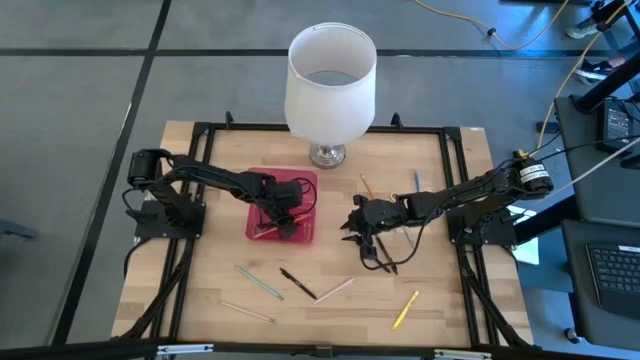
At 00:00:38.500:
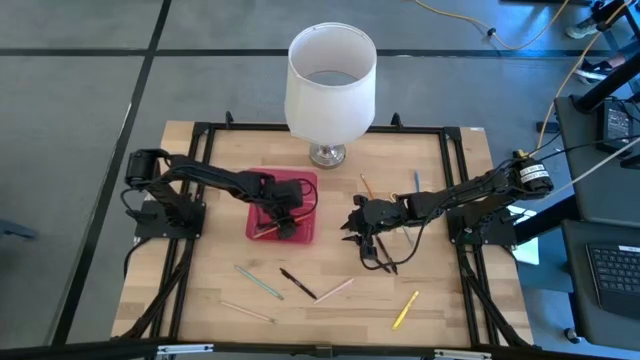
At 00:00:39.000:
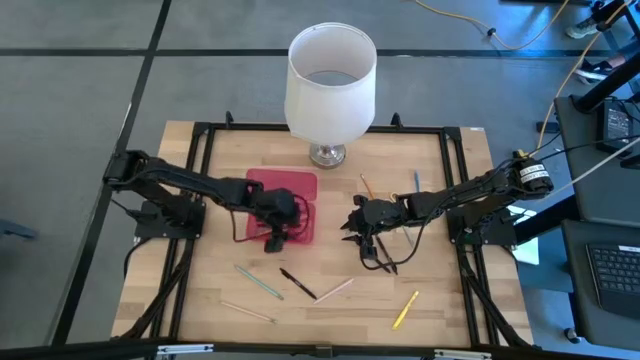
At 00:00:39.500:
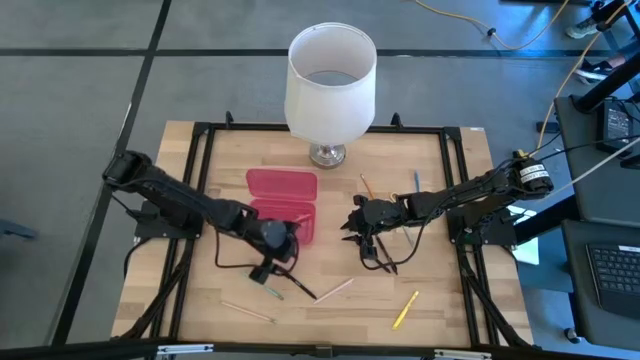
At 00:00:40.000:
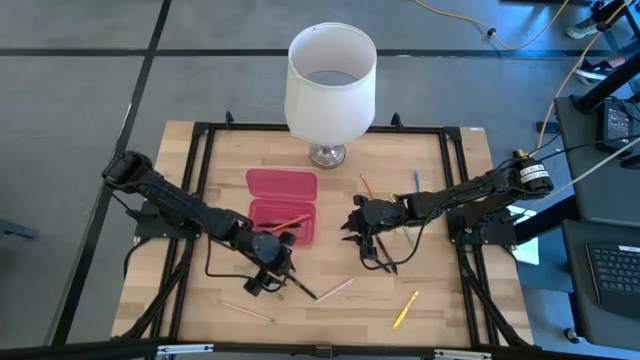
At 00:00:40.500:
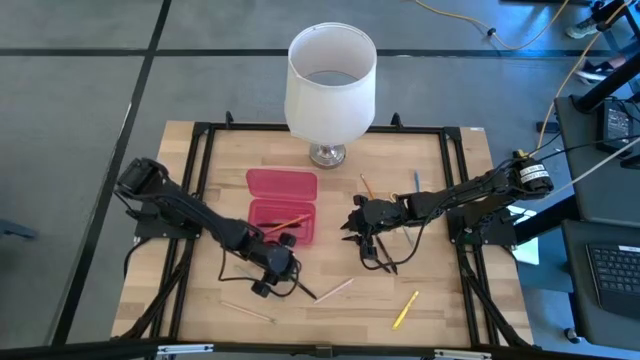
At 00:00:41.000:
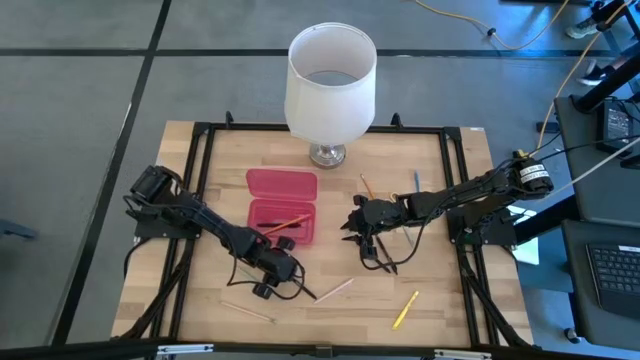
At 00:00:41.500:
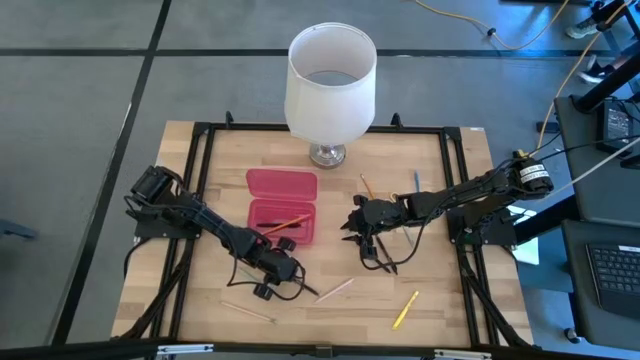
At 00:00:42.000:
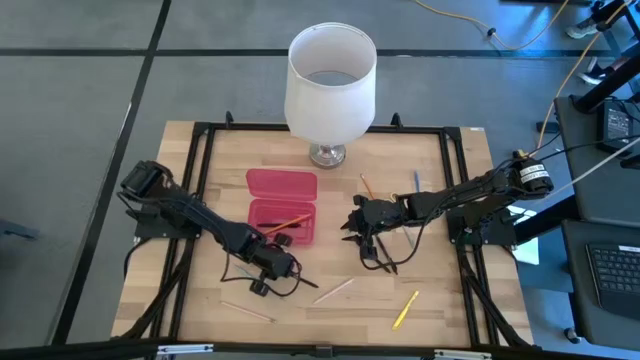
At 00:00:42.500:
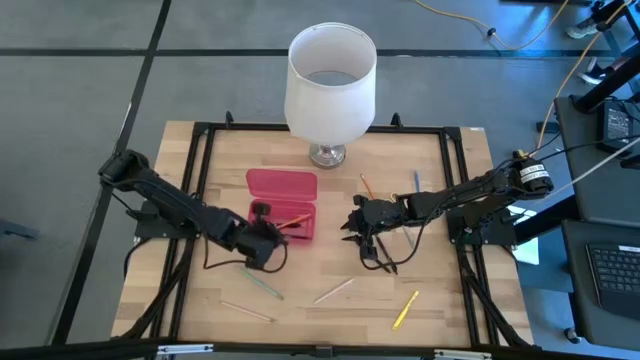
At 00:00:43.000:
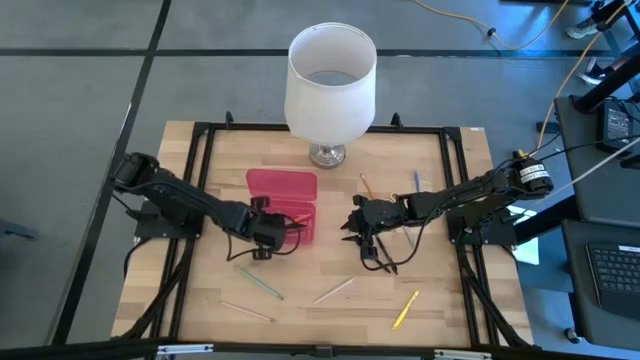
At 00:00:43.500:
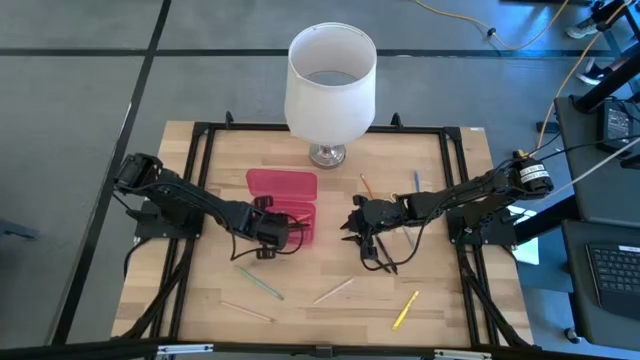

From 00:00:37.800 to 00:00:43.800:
Task: Pick & place school supplies into a supply box
Put the left black pen into the red supply box

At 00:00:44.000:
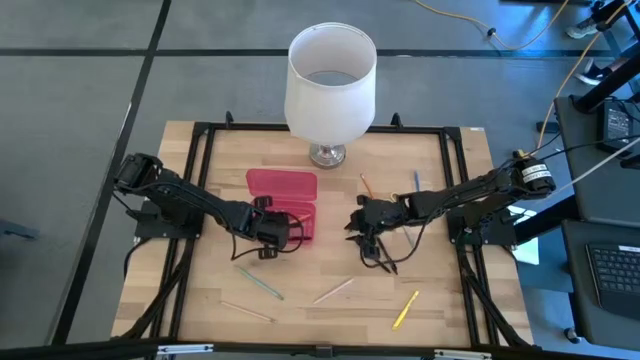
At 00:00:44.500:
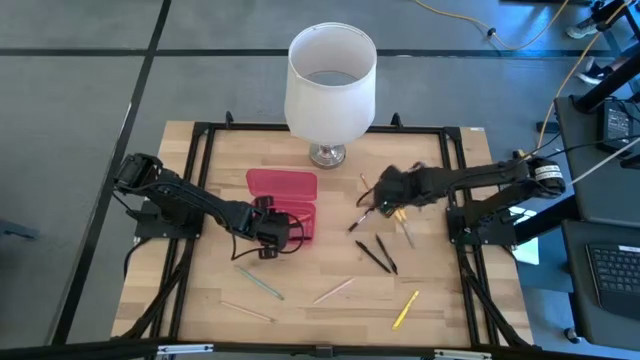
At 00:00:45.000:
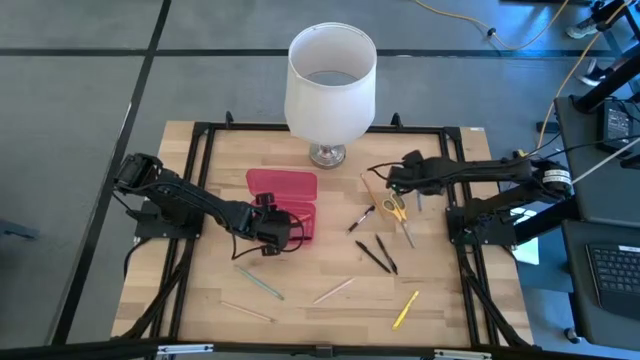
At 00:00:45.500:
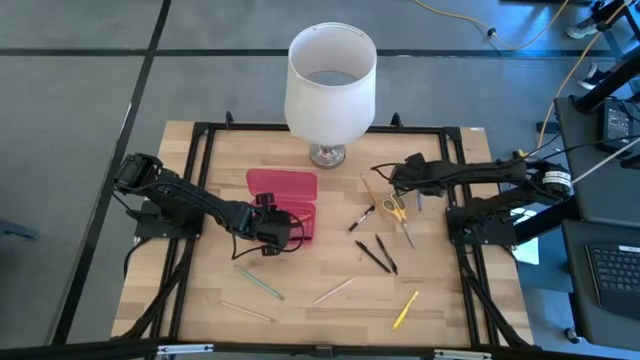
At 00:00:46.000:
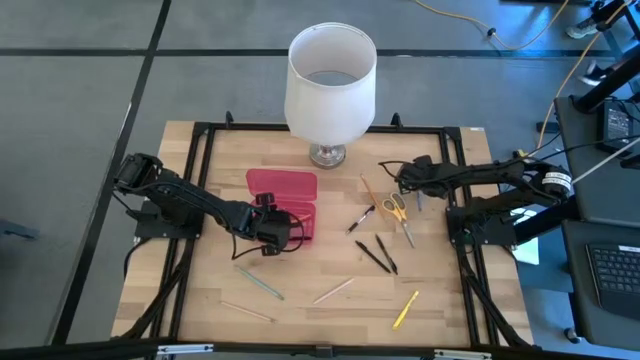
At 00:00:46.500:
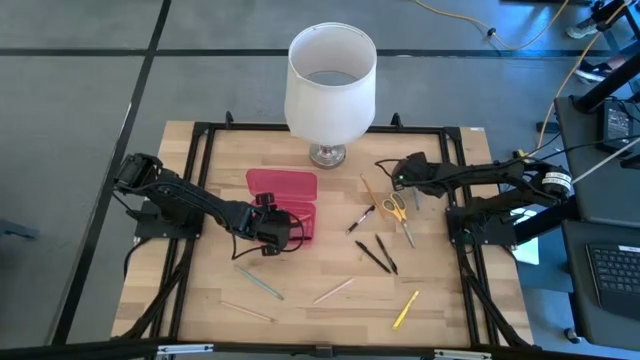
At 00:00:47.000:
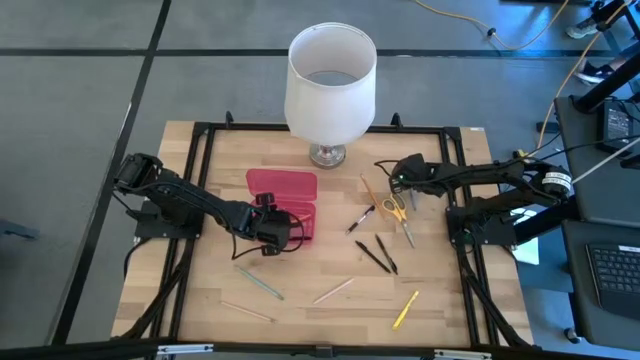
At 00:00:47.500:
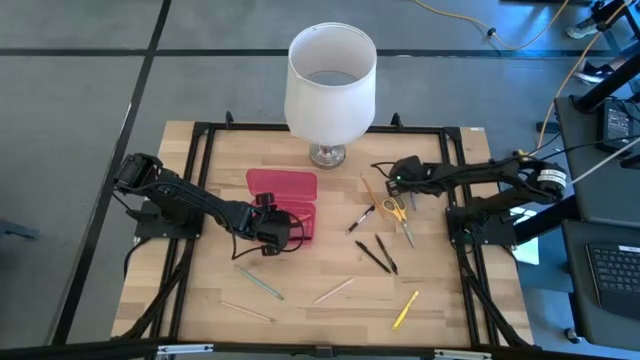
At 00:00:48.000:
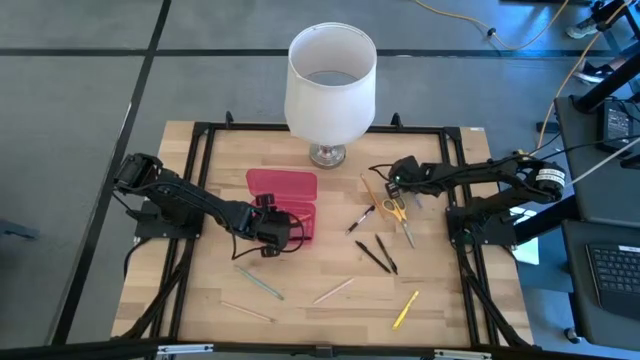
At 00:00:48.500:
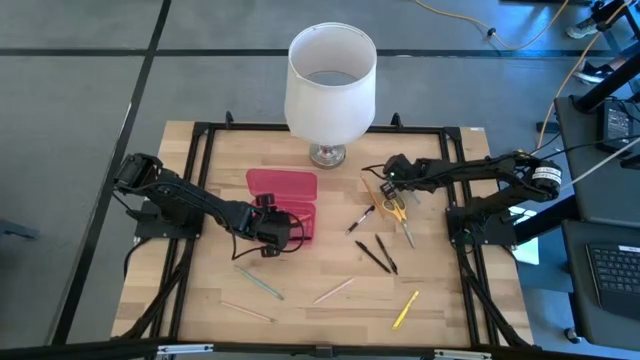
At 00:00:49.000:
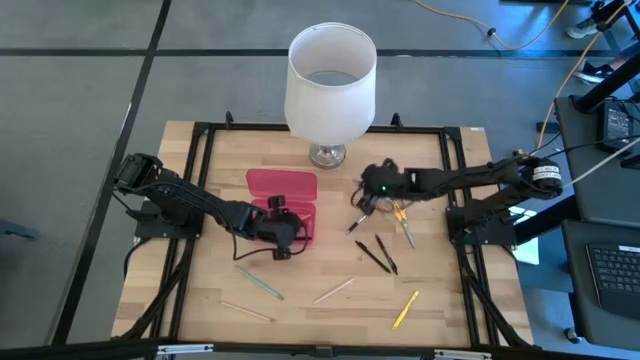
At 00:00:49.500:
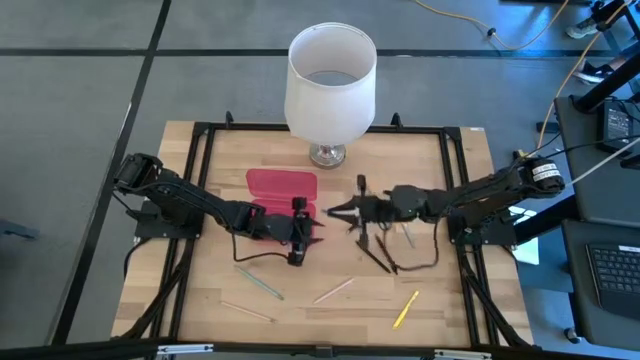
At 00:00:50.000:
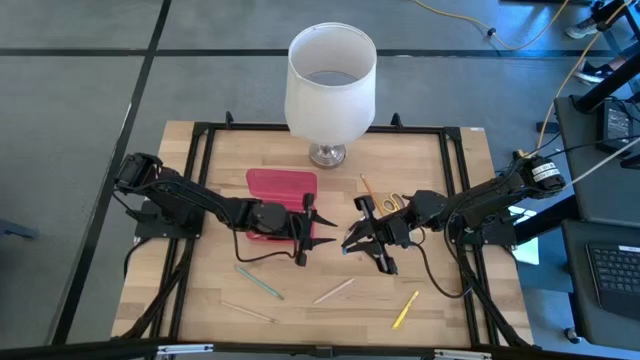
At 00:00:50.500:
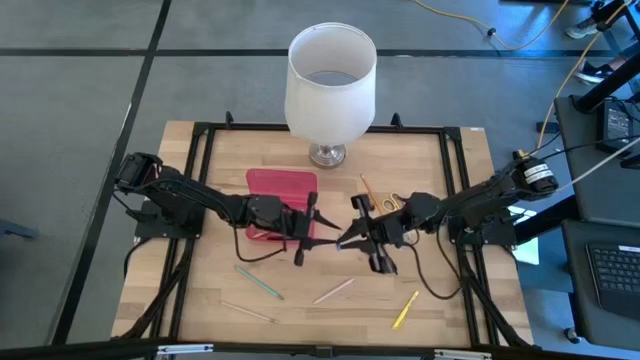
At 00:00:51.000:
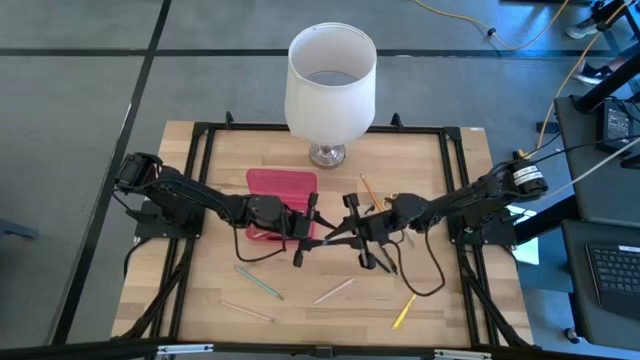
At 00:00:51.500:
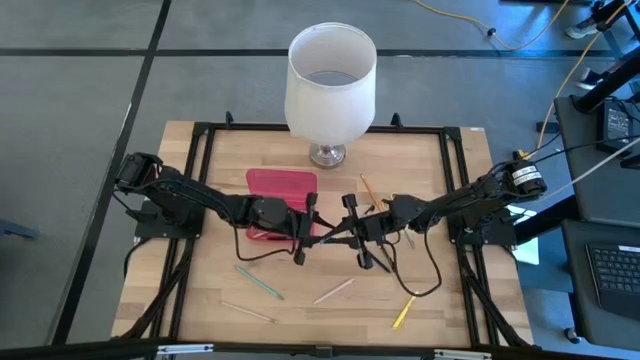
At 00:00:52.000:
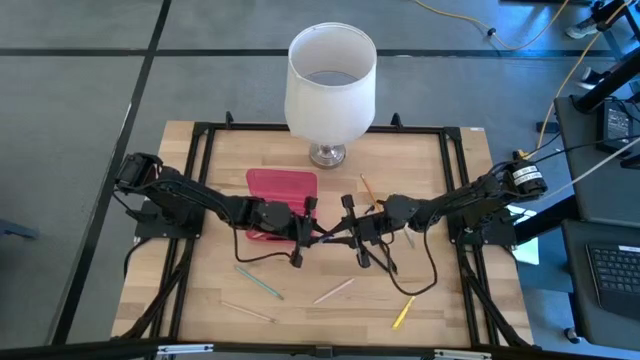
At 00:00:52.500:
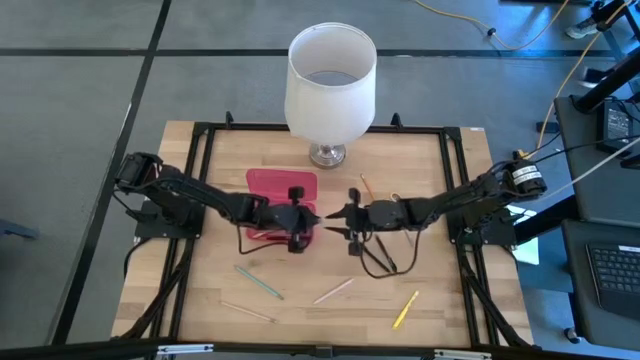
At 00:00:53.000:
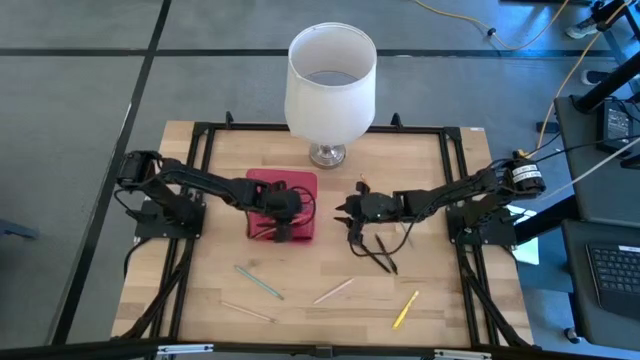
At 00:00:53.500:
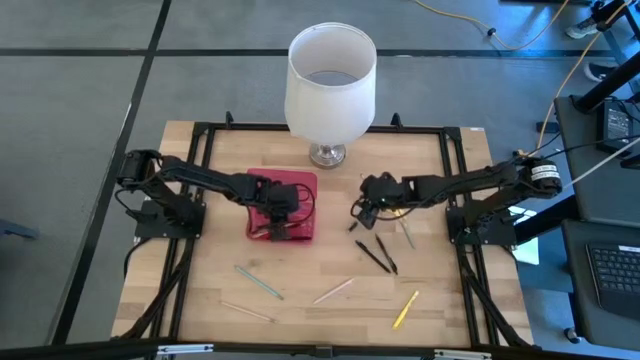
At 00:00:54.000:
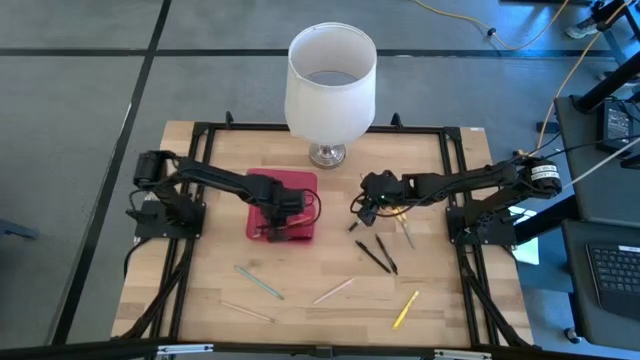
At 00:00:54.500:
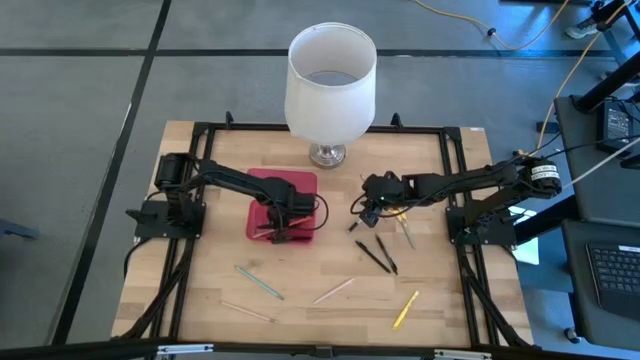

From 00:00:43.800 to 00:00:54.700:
Put the blue pen into the red supply box

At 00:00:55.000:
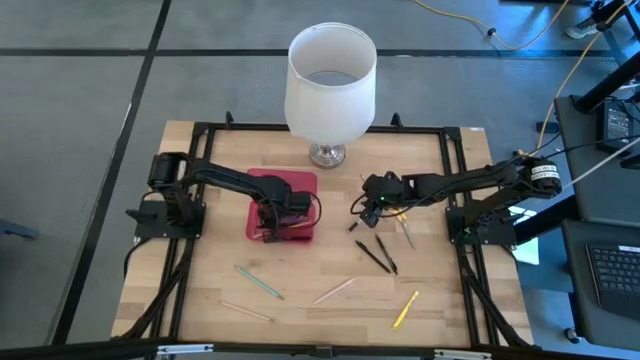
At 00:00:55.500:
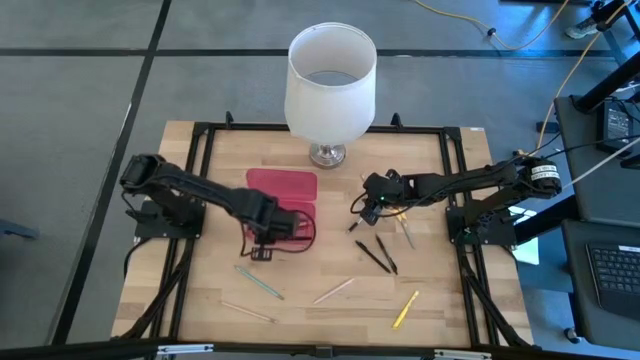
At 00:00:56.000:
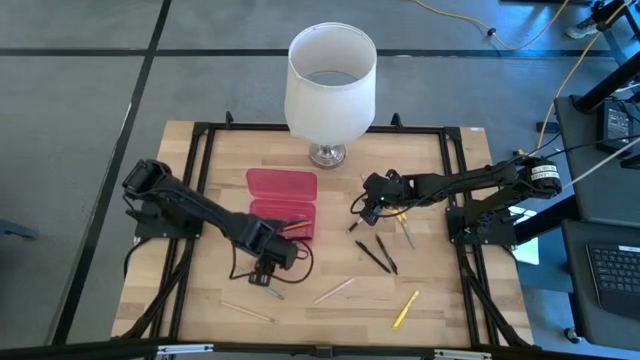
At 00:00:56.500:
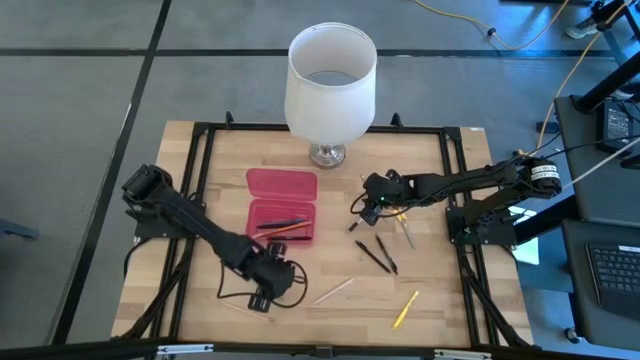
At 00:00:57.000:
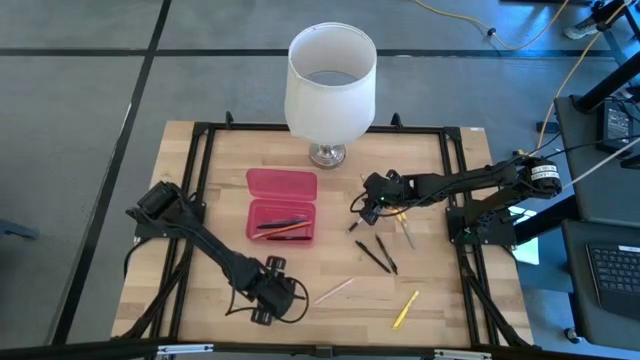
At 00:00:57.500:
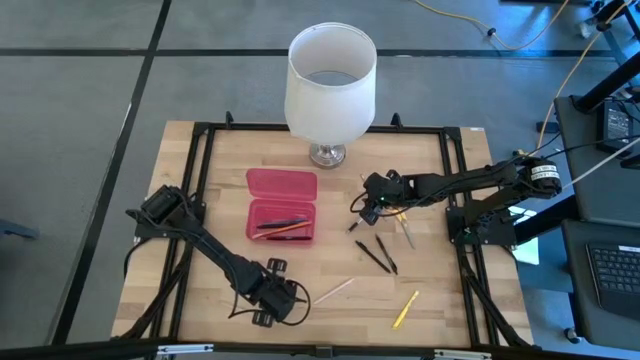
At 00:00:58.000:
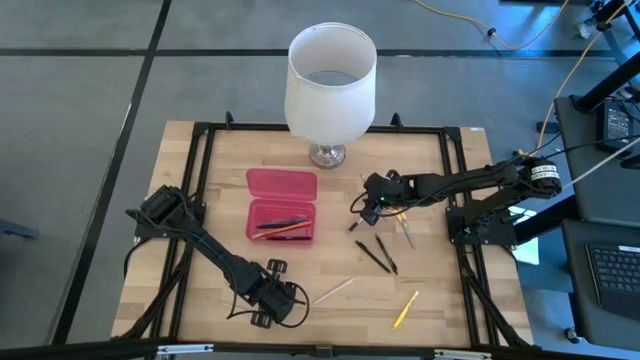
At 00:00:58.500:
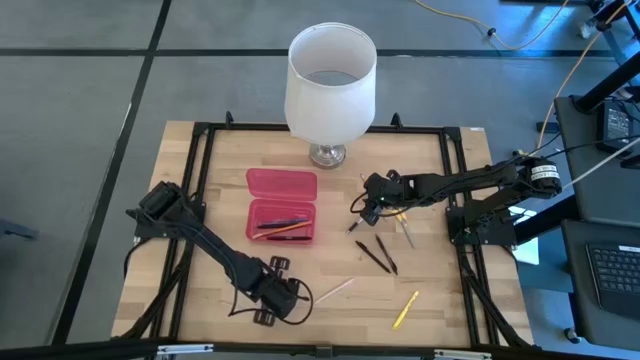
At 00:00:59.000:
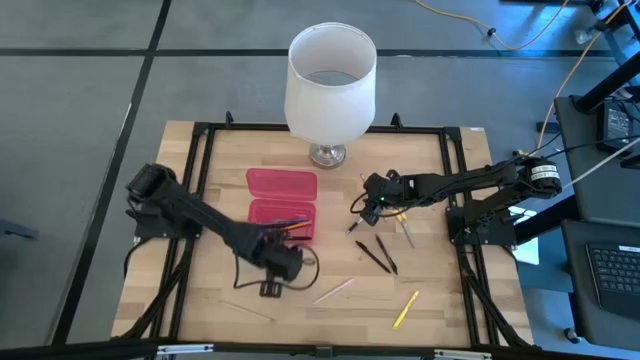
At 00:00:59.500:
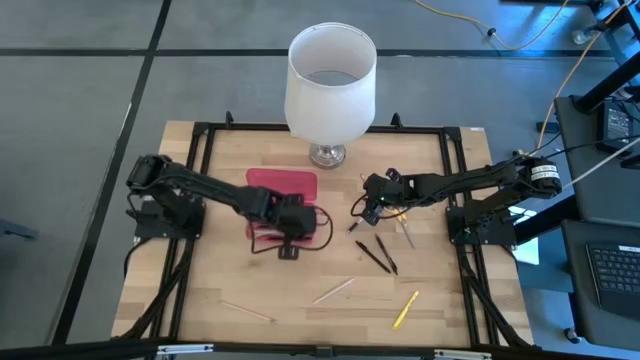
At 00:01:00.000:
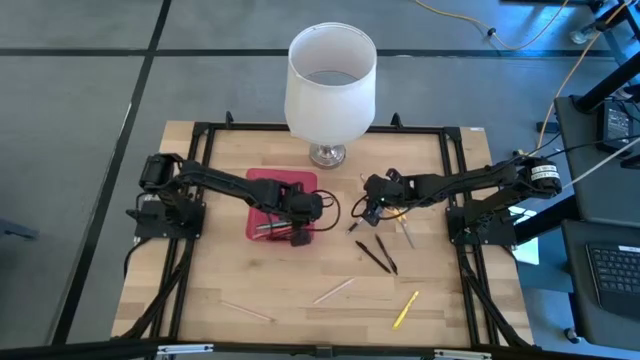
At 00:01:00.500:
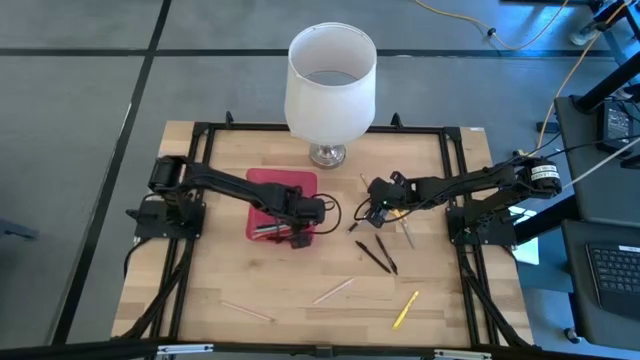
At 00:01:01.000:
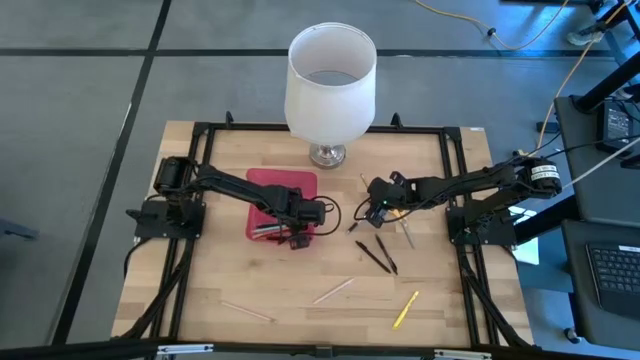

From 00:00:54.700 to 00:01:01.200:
Put the blue pencil into the red supply box
